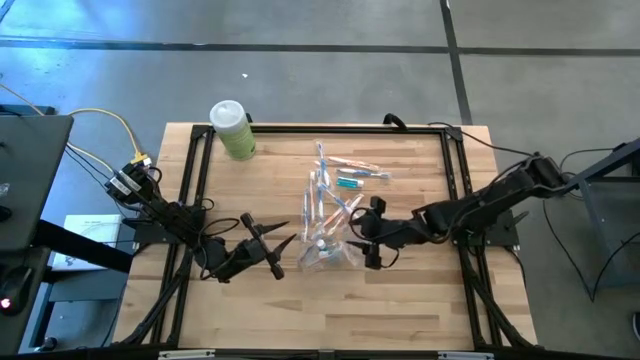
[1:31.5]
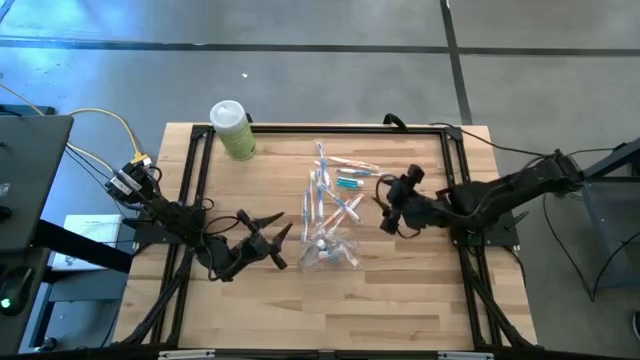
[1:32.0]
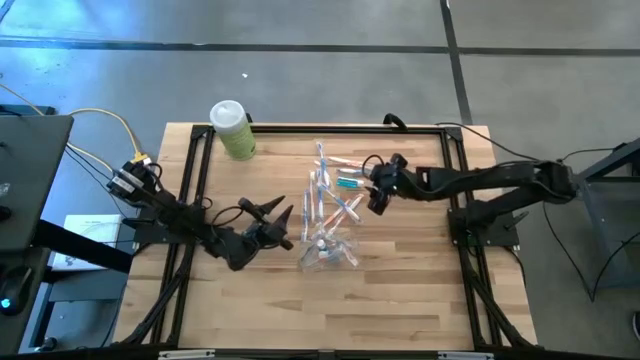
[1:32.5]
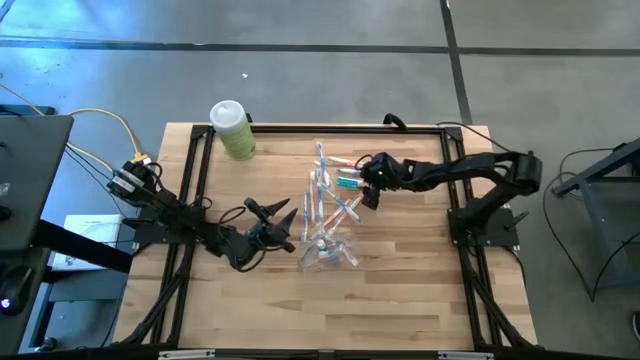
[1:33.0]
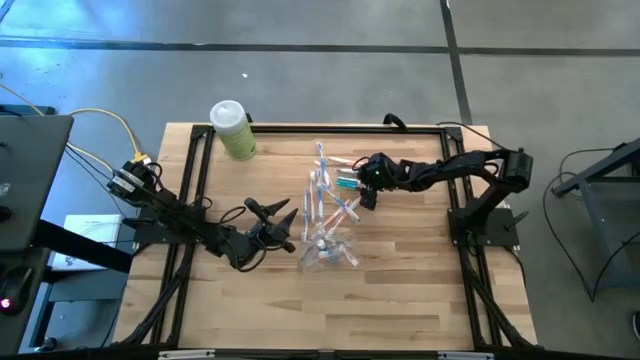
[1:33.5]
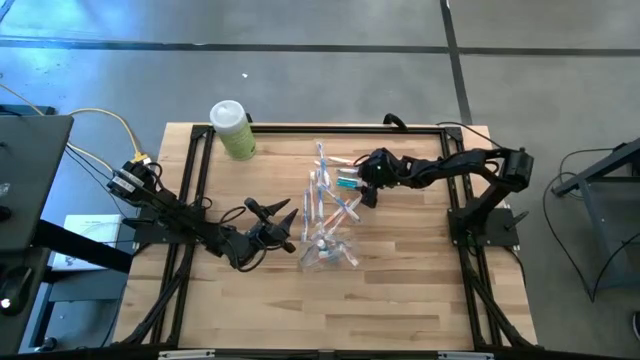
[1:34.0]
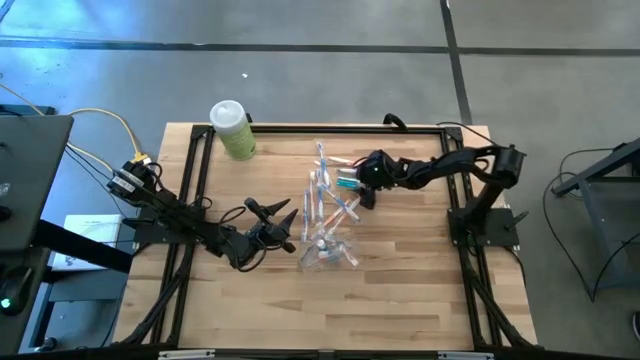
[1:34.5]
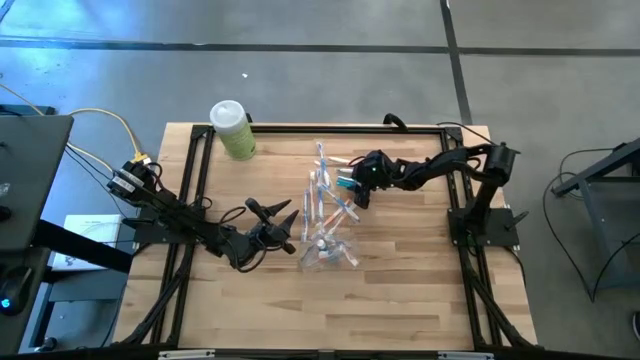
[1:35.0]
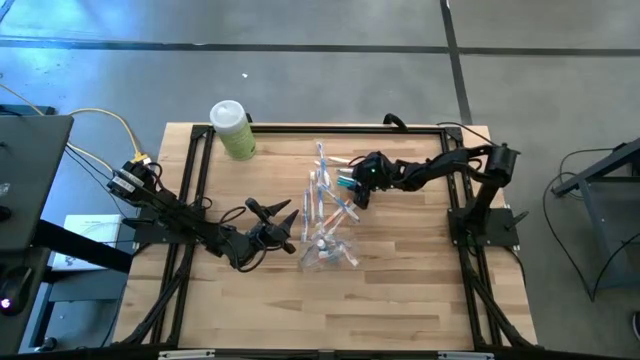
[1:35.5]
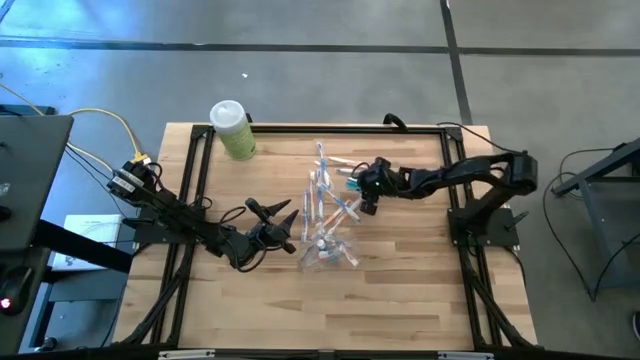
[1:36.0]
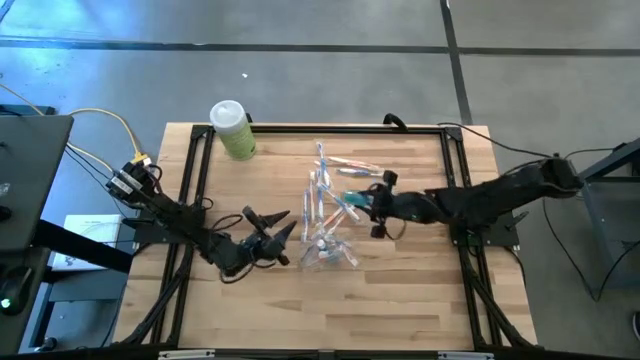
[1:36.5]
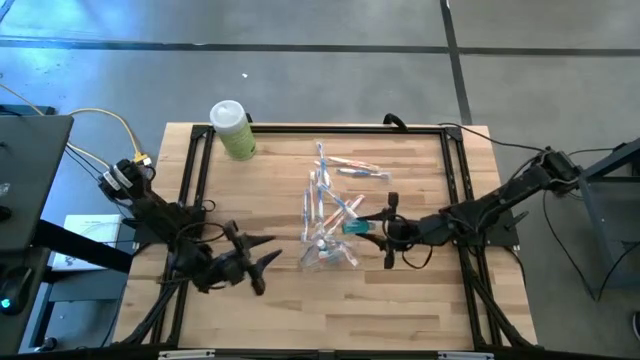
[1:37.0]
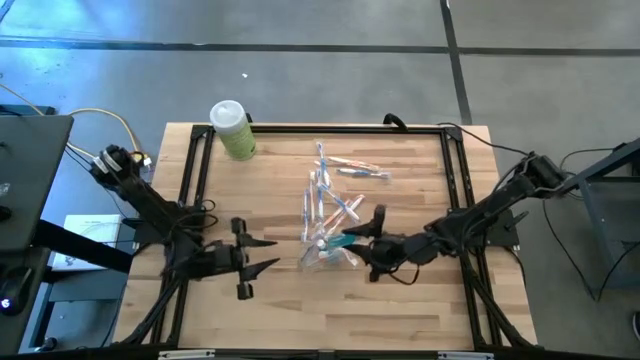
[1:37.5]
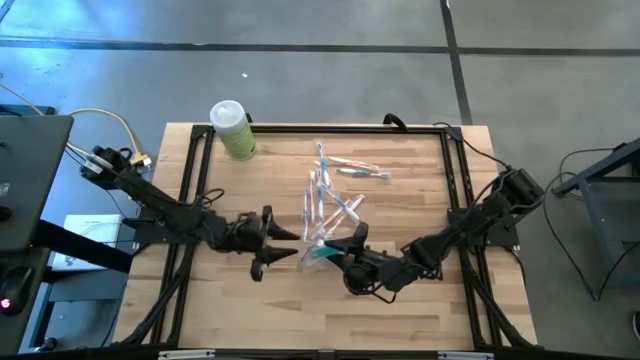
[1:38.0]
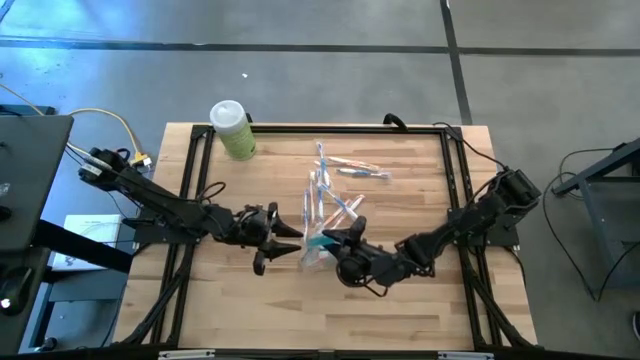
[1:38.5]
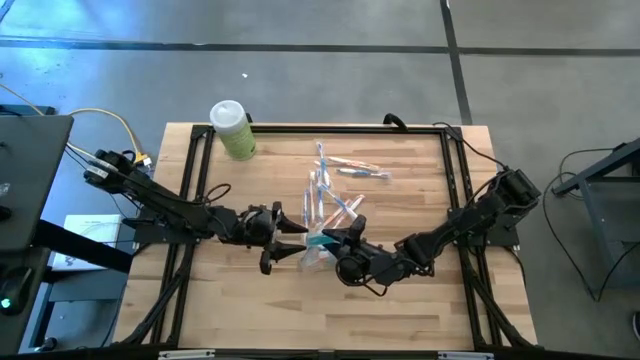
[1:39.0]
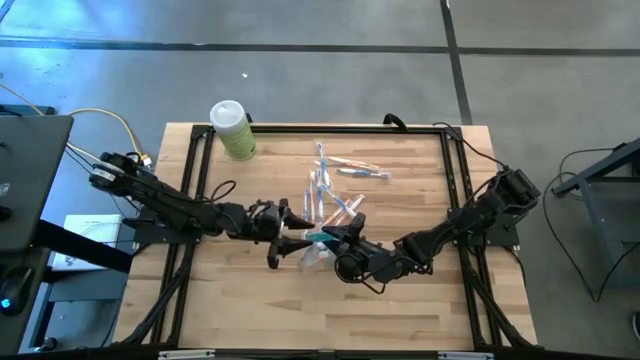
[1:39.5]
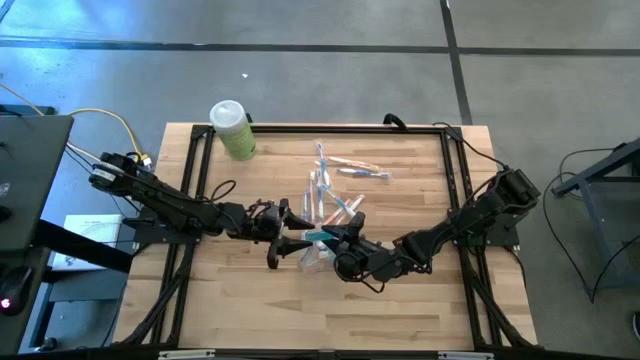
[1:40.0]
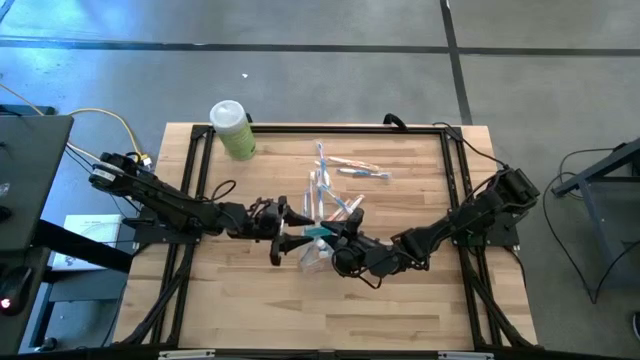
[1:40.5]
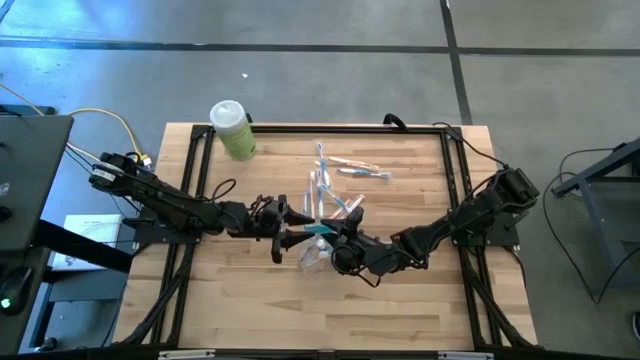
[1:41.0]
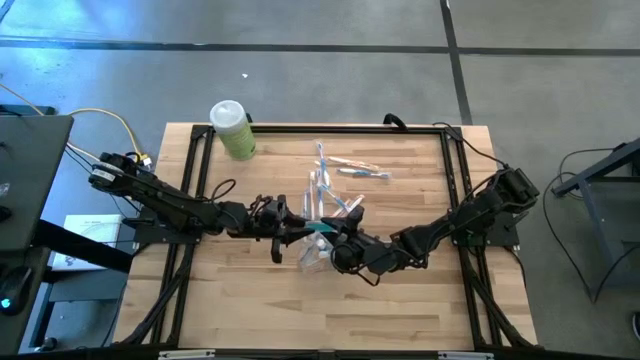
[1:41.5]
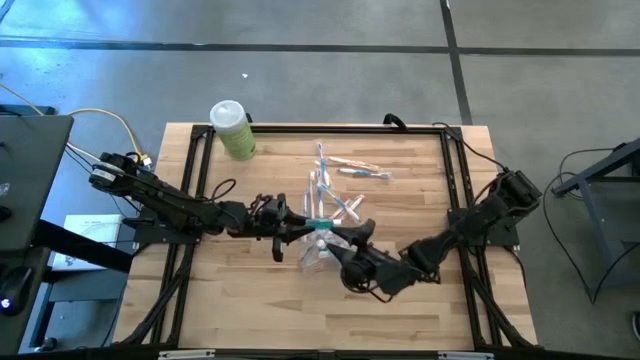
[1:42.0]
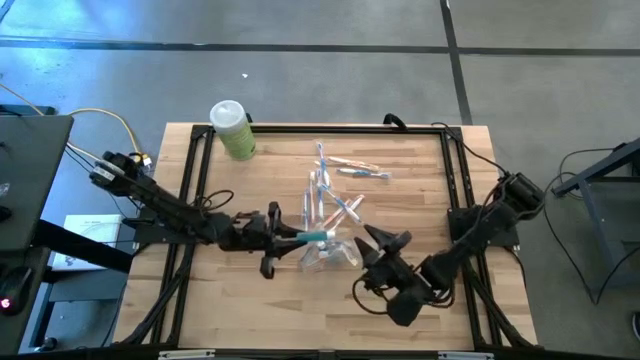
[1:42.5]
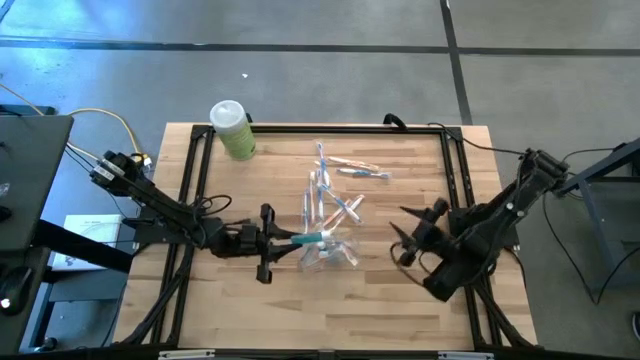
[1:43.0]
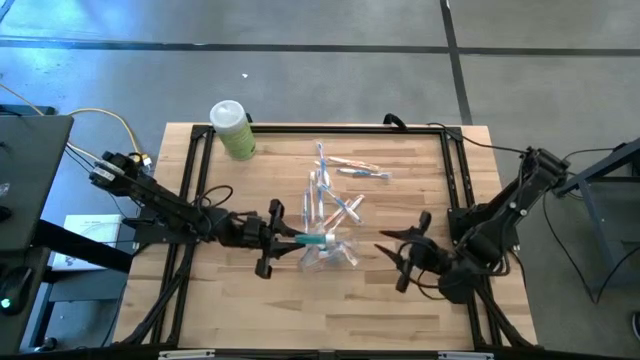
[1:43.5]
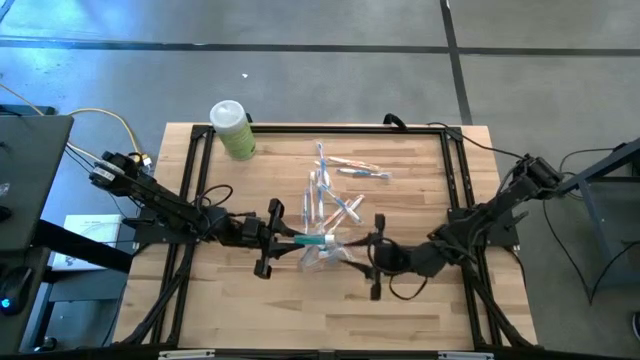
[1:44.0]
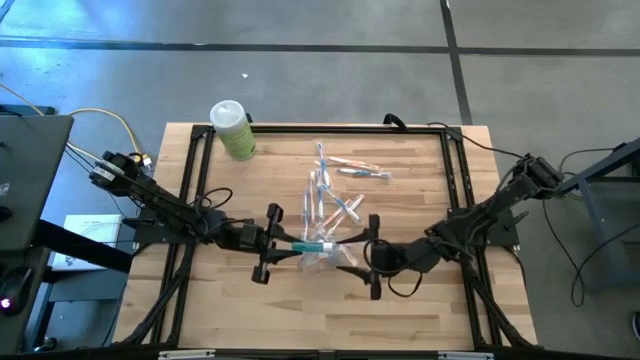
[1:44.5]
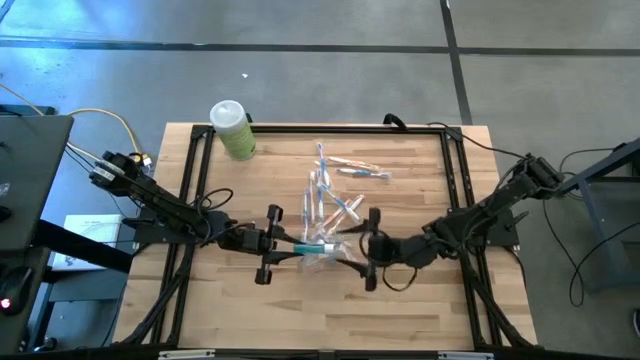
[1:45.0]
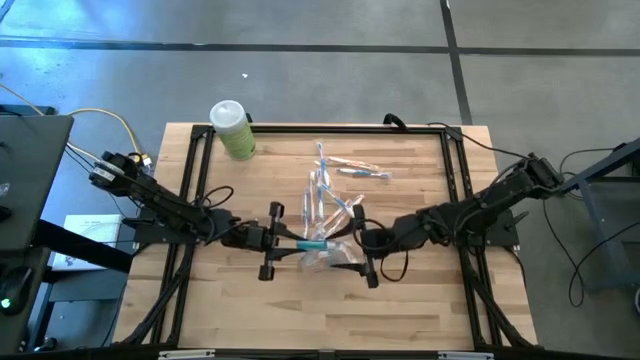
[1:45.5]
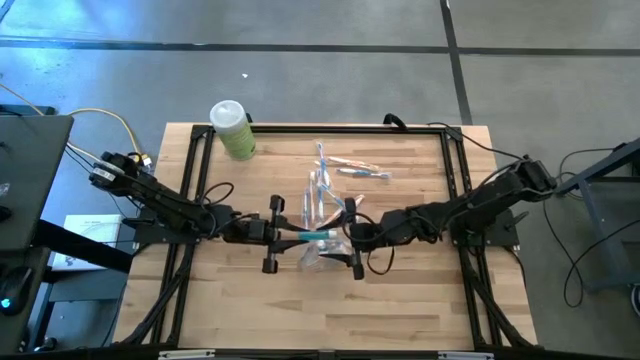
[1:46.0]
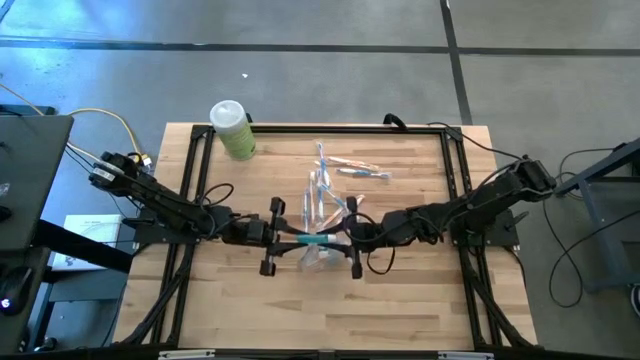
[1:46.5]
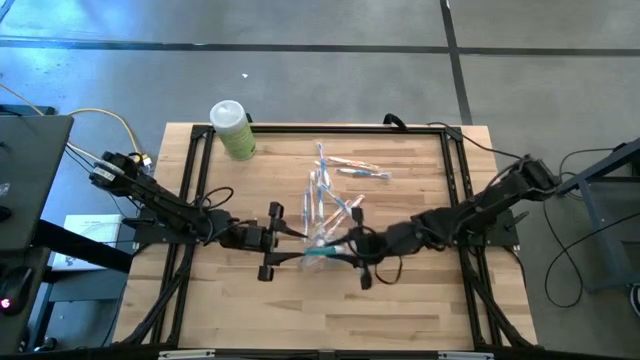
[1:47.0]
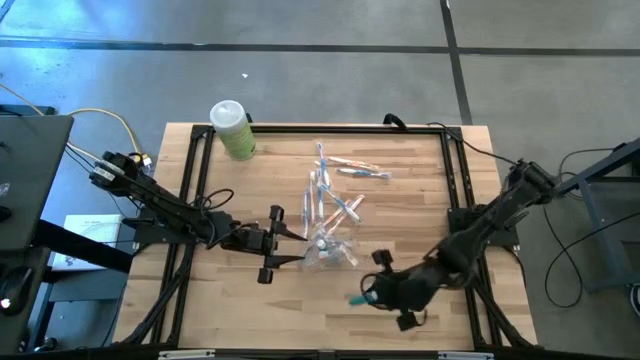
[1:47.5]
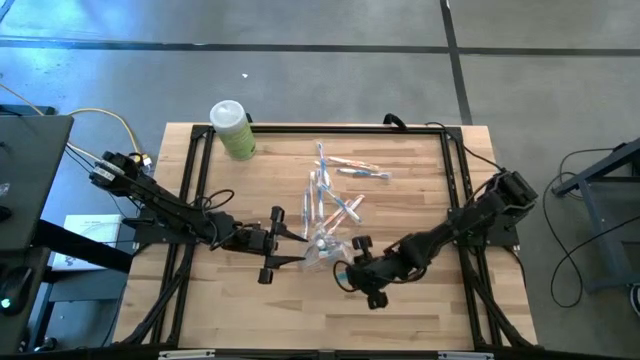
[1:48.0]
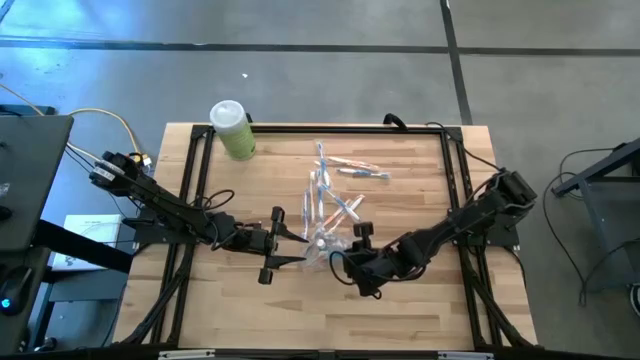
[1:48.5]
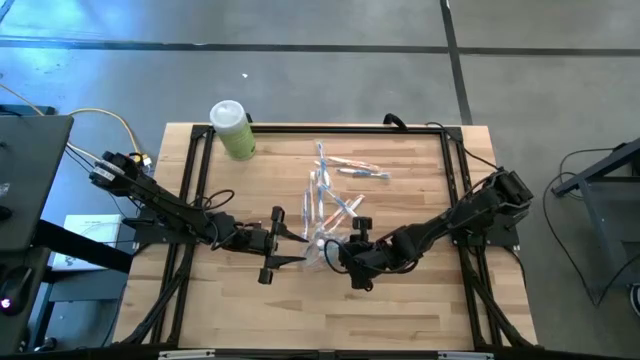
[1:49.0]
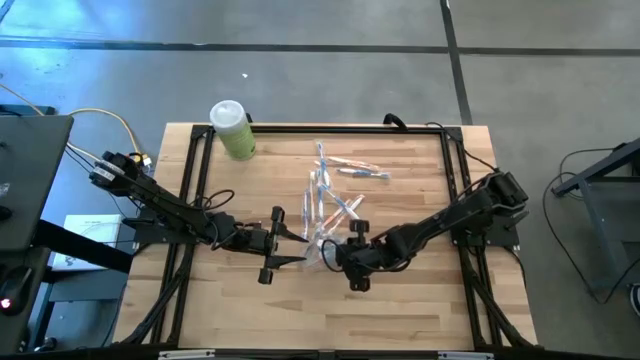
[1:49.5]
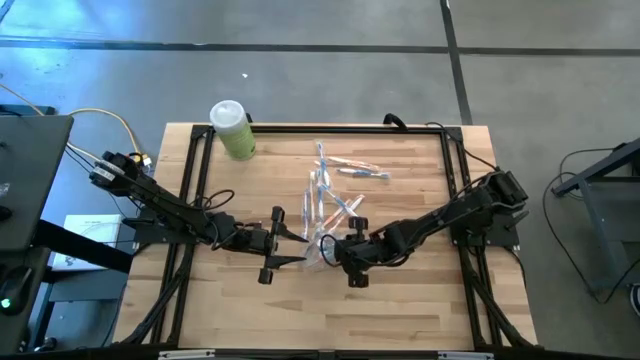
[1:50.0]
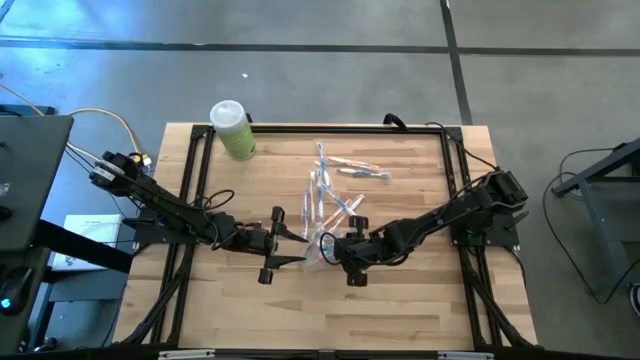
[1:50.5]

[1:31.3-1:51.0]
Task: Pick & Place toothbrushing station
Put the blue mouthwash bottle into the transparent organizer

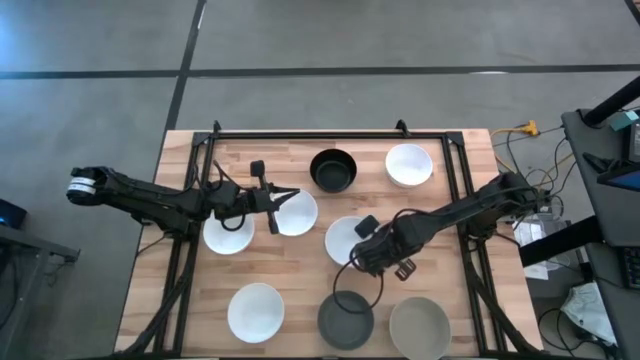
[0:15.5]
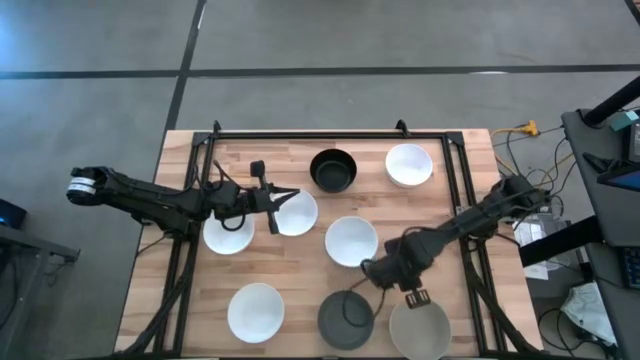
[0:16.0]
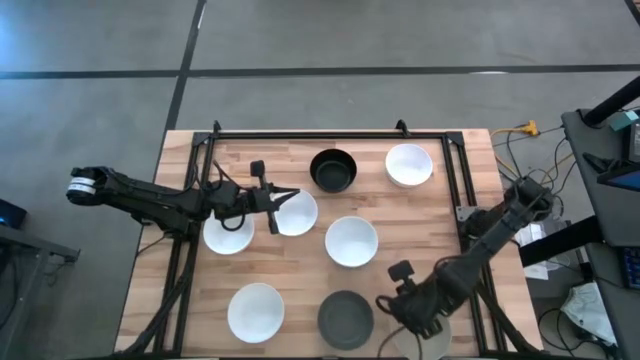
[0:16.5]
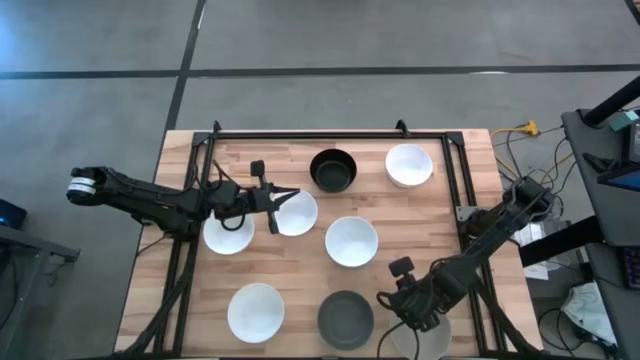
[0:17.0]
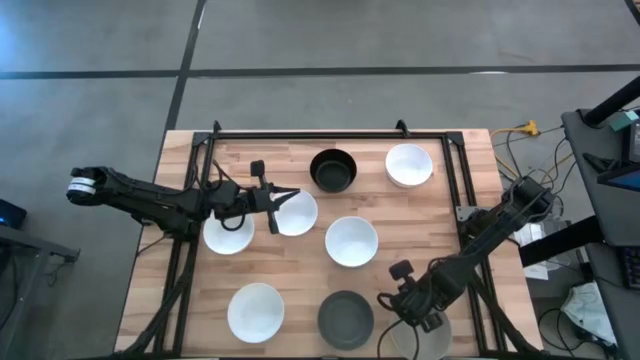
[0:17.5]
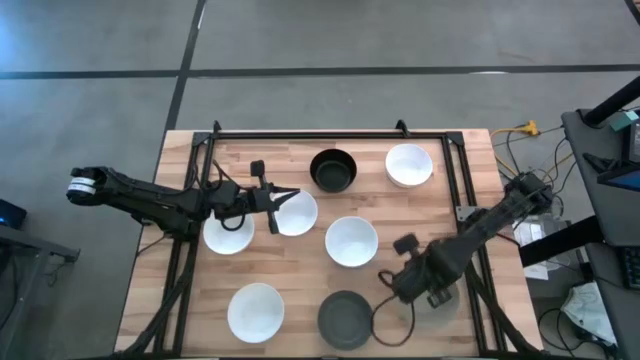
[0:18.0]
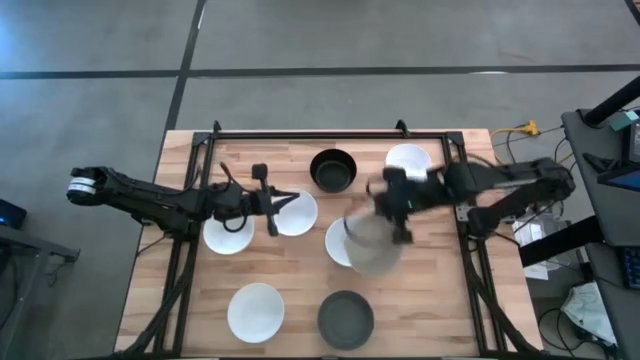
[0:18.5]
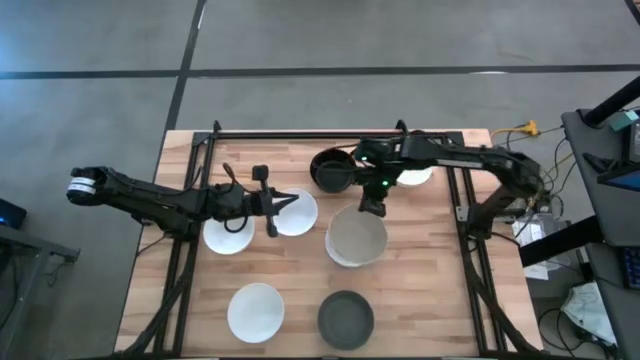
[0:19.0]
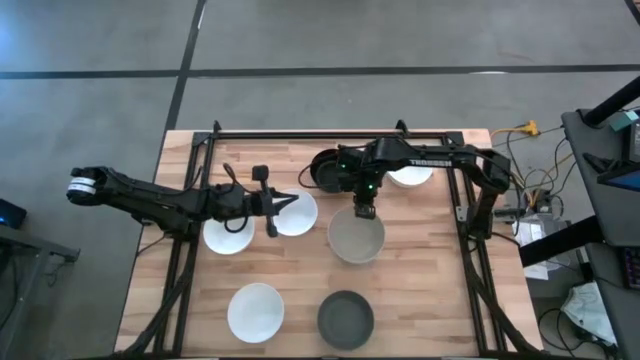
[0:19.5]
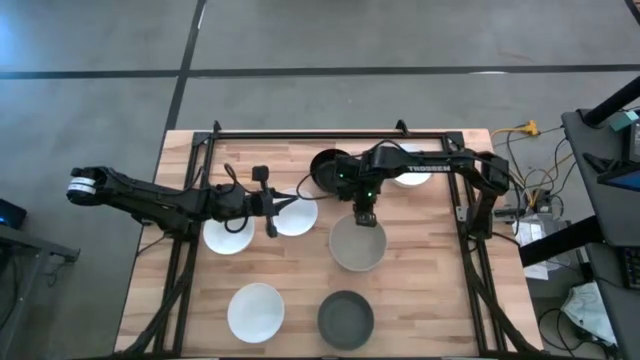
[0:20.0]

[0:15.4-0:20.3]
Task: Nest bowls inside each other
Stack the gray bowl on top of the white bowl
